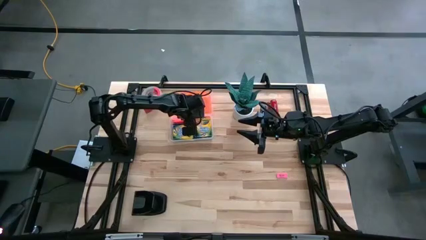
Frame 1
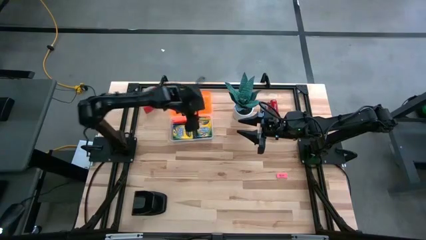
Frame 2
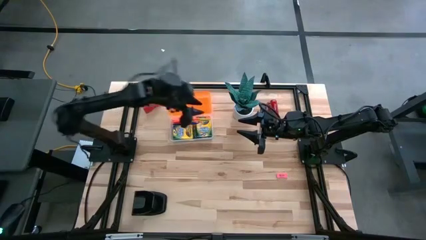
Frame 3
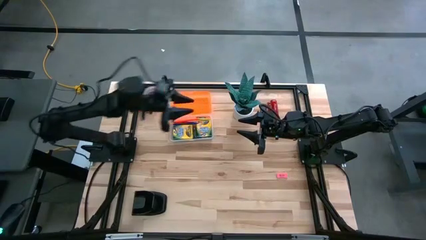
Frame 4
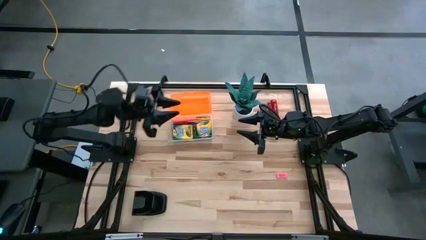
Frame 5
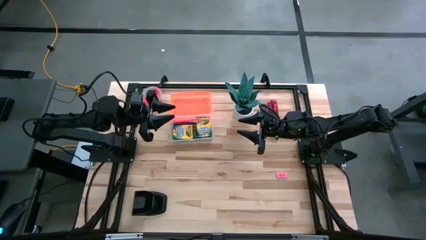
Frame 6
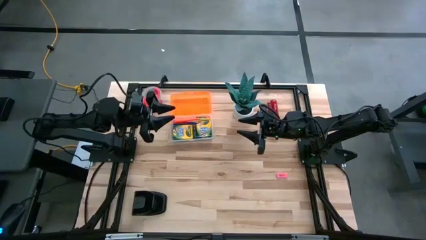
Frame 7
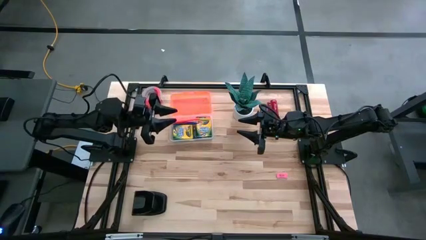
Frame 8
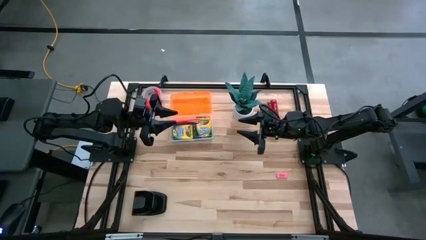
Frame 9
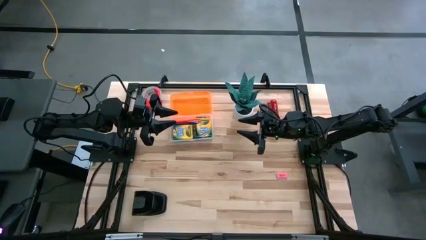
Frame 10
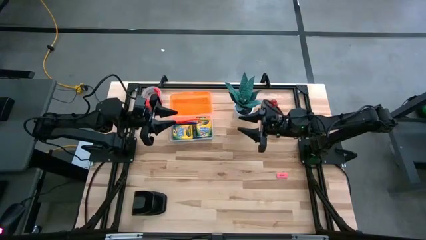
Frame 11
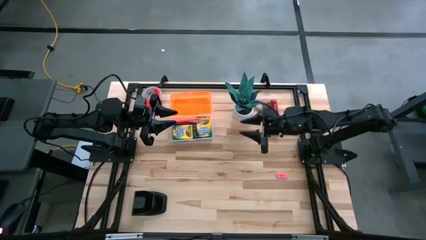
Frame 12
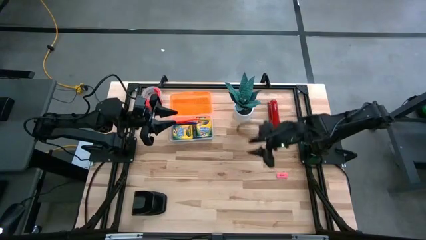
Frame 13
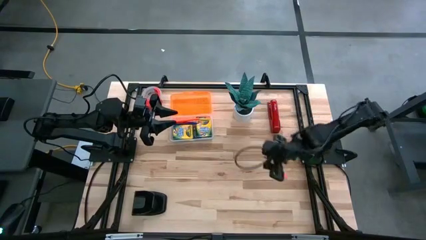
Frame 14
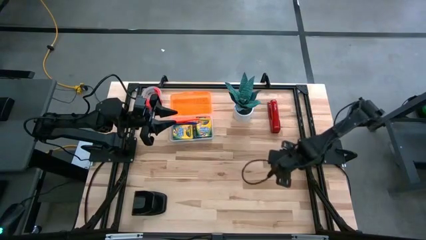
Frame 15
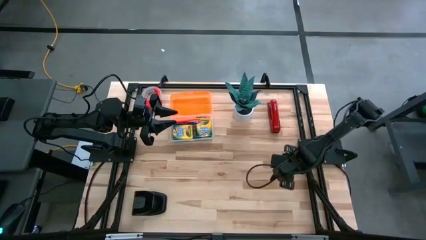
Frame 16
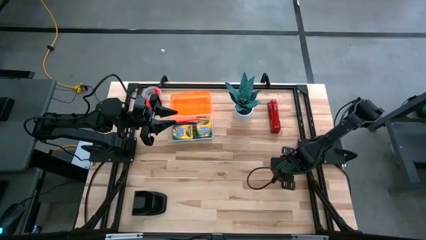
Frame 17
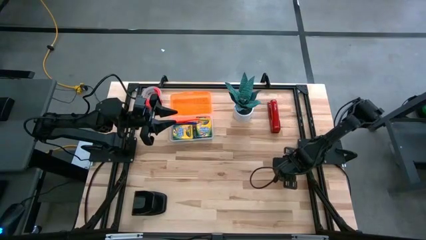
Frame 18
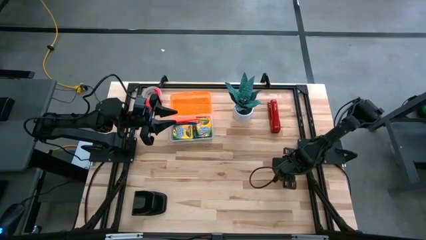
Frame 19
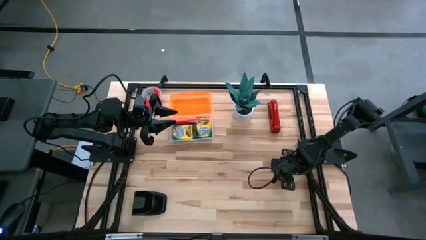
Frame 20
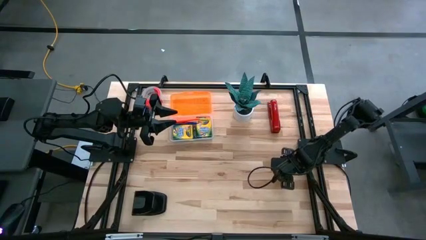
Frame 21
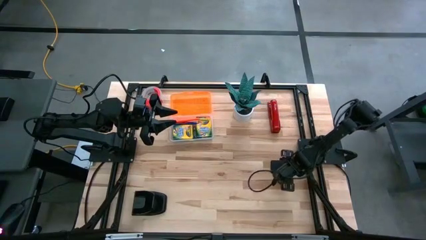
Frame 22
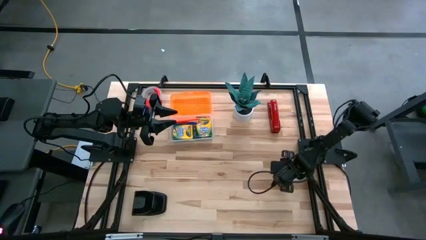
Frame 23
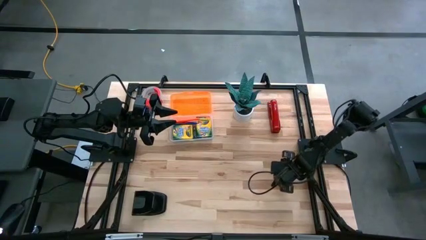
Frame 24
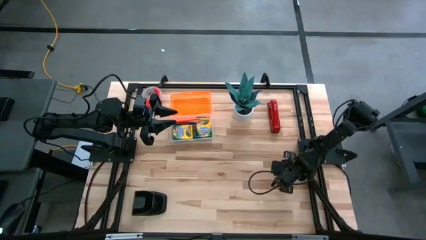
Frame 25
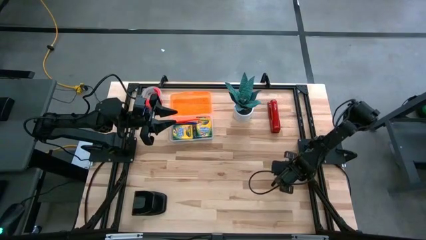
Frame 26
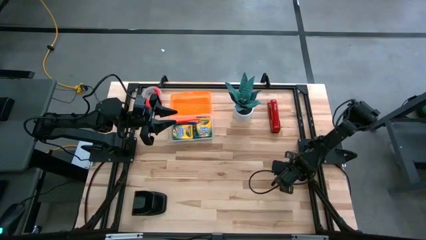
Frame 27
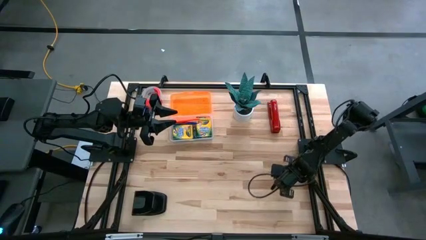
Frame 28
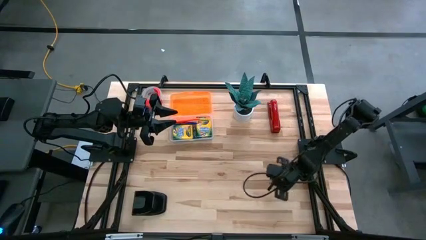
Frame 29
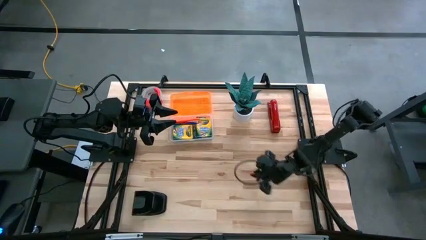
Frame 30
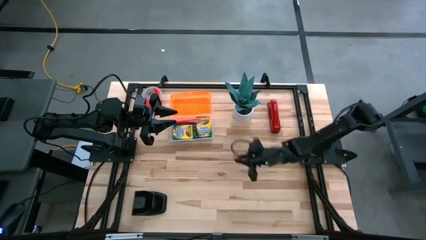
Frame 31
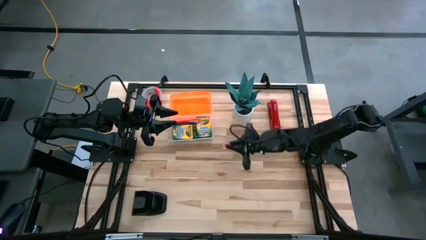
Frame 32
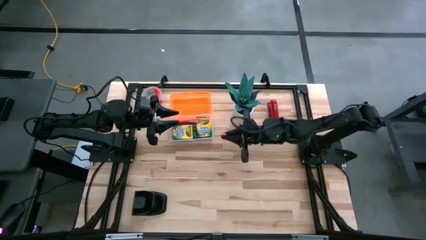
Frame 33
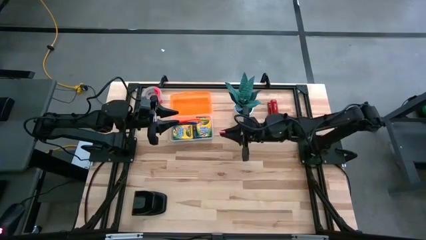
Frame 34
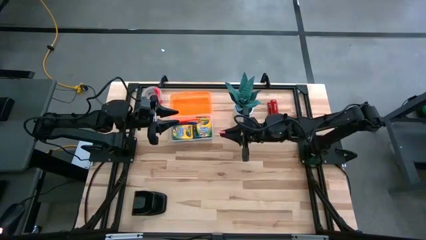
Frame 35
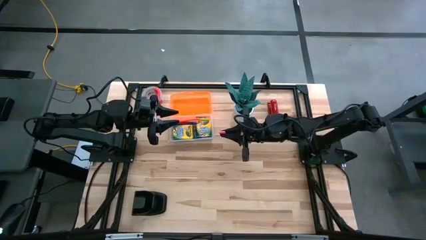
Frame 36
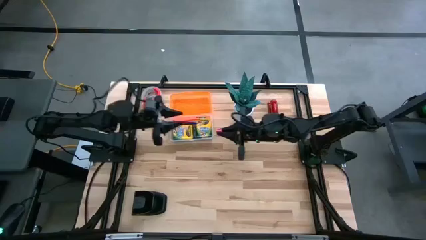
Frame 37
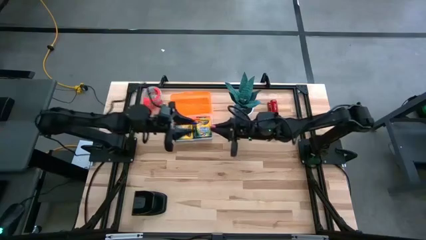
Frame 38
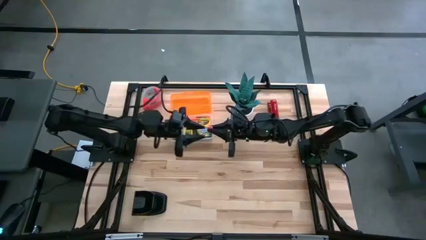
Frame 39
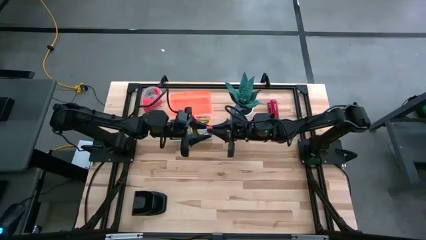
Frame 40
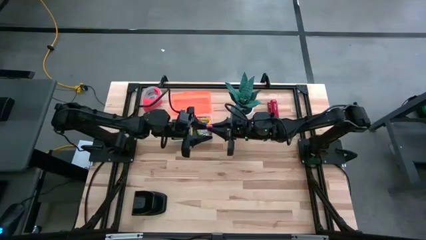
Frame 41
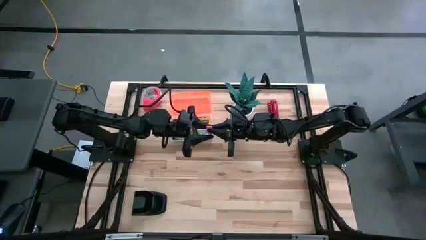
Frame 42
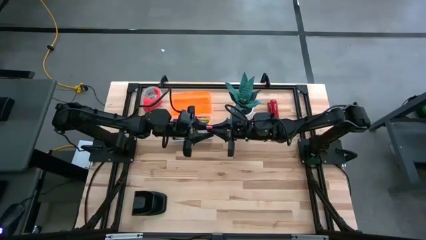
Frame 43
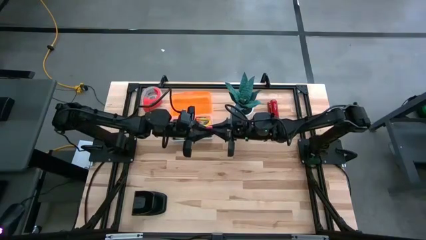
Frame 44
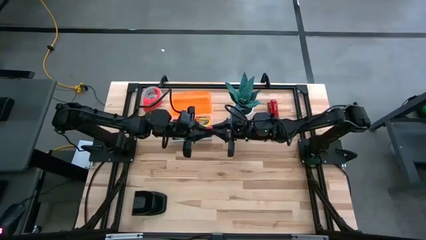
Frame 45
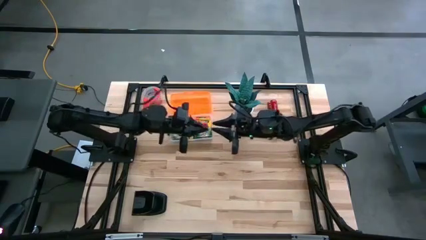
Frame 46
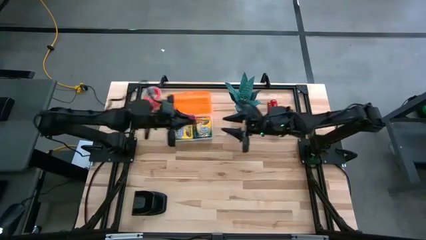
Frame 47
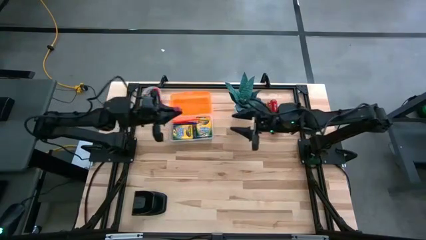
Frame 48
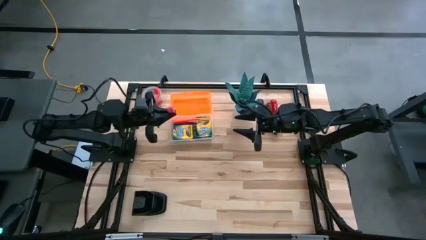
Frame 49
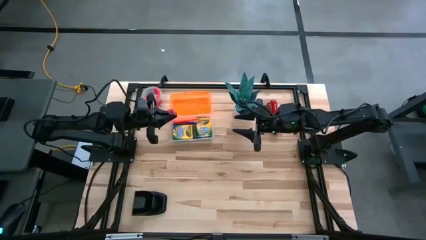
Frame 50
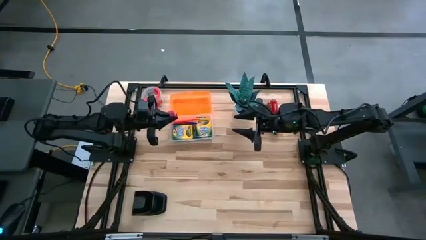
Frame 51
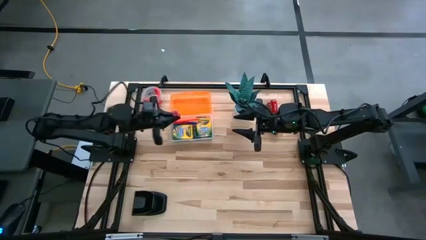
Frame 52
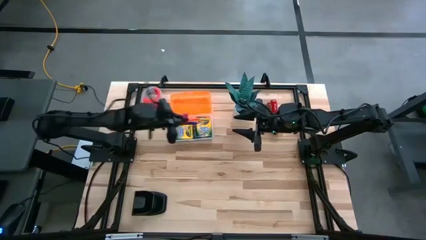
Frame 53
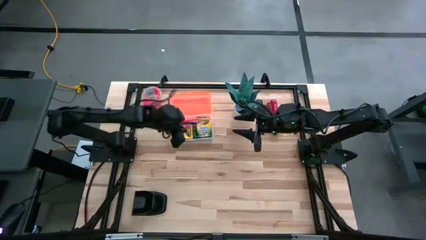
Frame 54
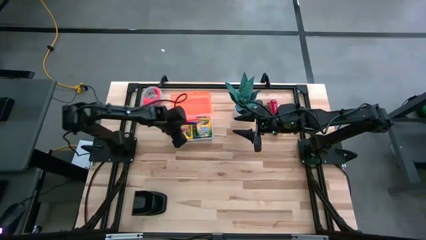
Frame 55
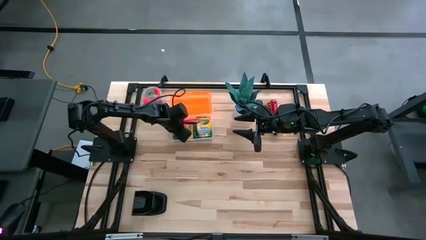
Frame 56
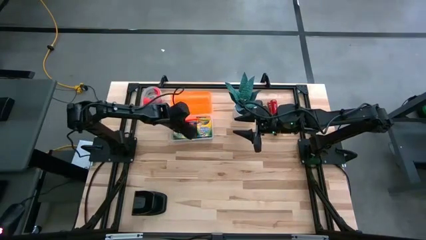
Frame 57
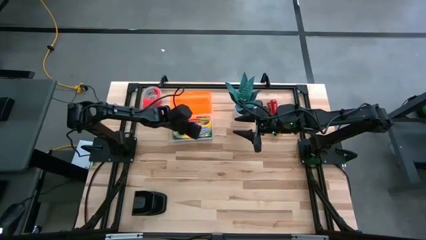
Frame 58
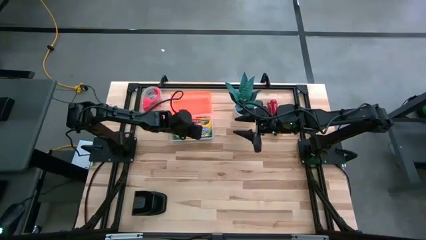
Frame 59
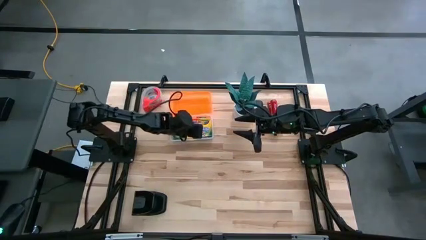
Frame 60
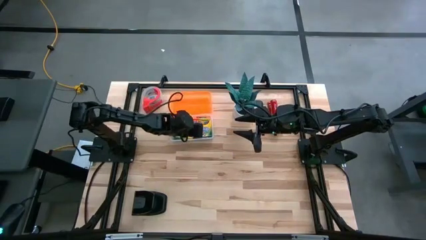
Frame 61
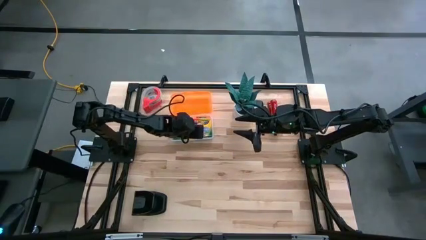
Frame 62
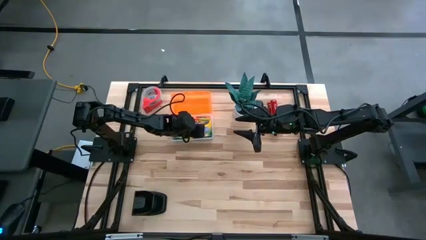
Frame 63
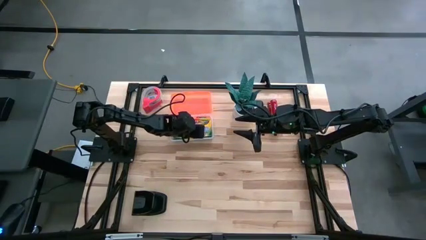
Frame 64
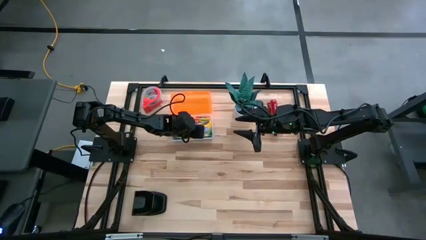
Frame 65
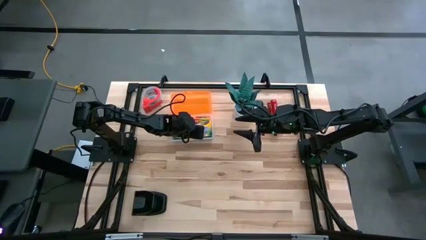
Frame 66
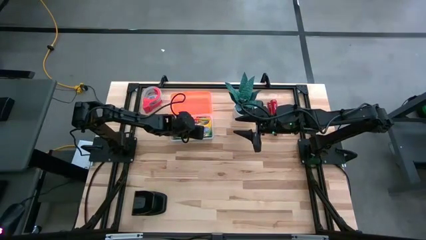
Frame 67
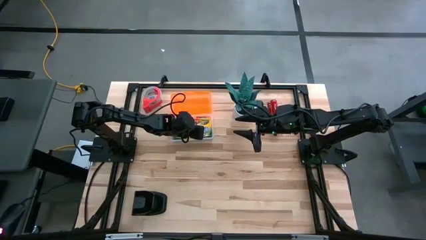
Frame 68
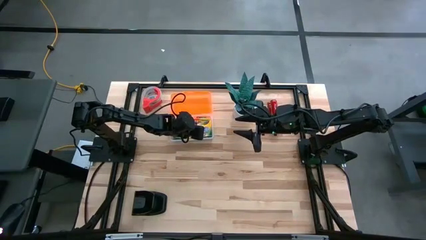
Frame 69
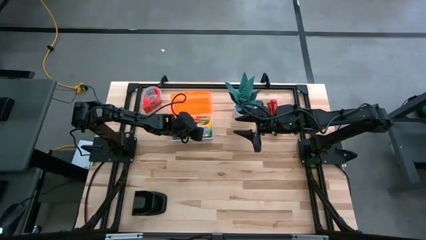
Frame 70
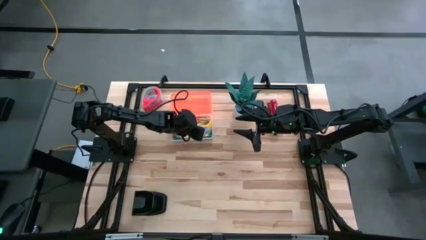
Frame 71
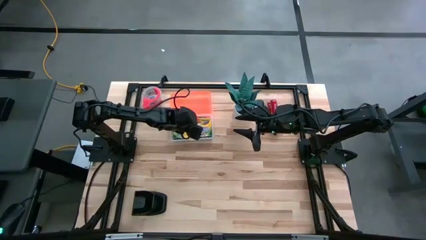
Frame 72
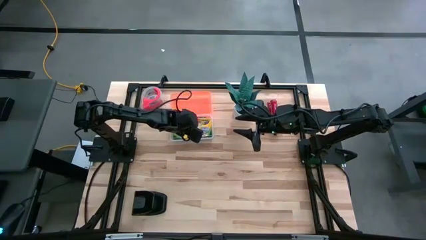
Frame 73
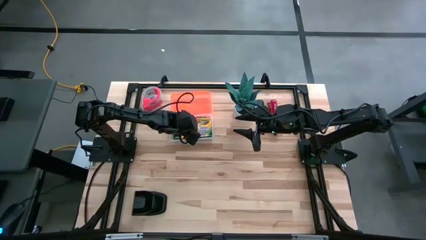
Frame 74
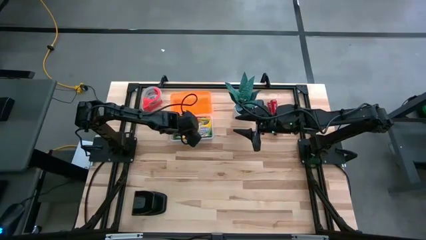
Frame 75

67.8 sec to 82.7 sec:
Task: Pack school essentials
Put the pink eraser into the orange supply box

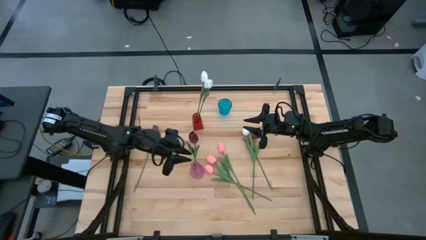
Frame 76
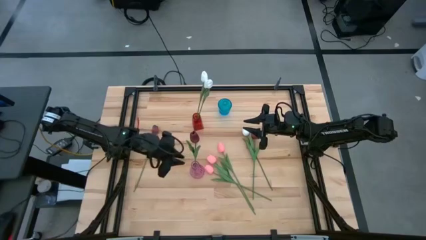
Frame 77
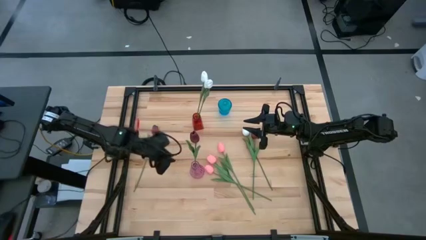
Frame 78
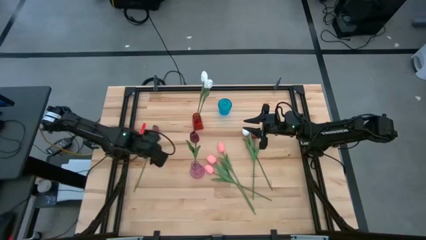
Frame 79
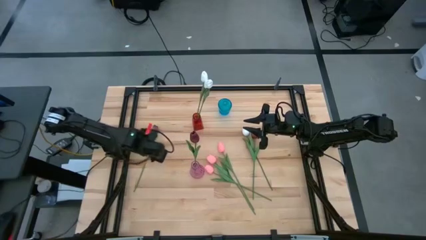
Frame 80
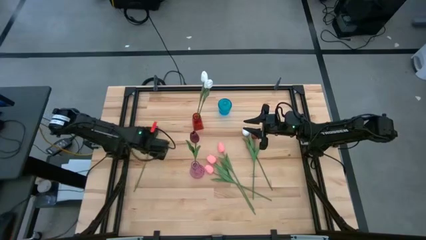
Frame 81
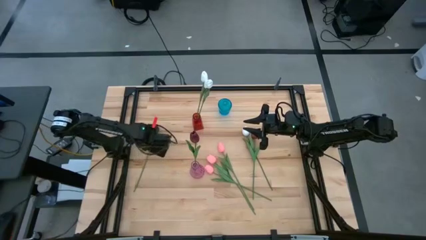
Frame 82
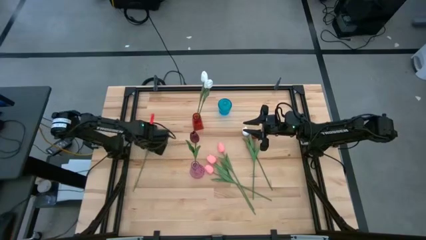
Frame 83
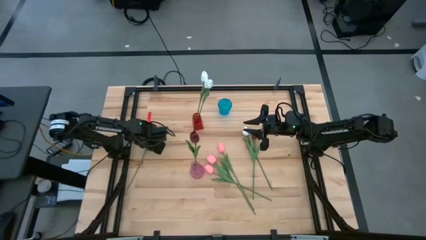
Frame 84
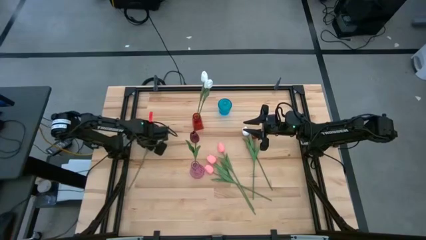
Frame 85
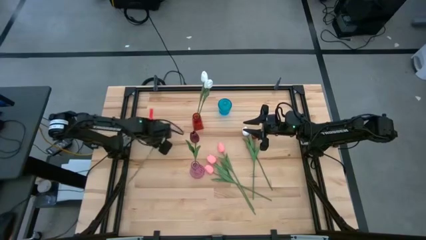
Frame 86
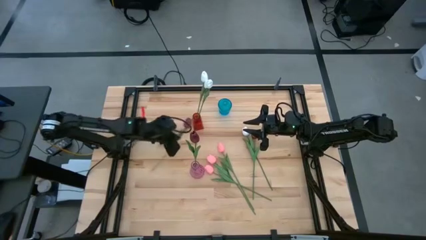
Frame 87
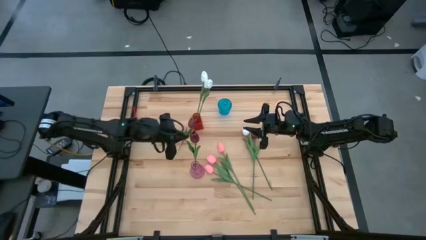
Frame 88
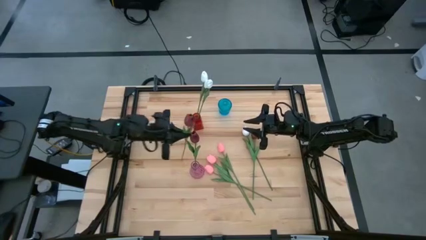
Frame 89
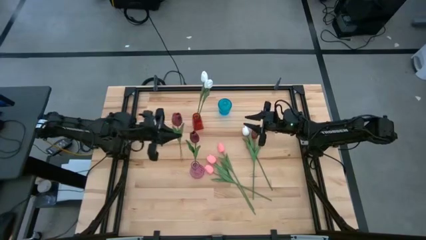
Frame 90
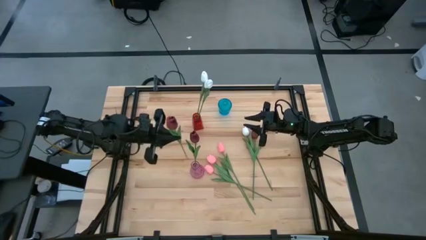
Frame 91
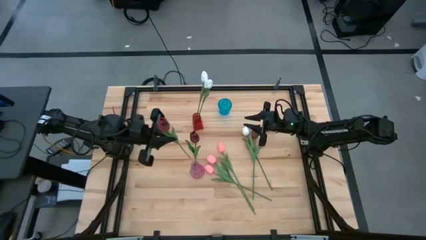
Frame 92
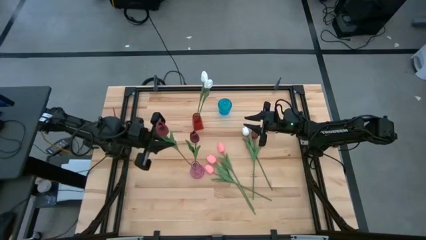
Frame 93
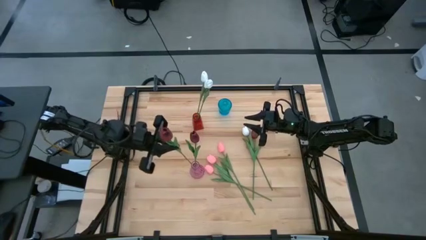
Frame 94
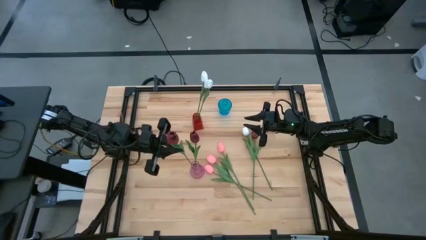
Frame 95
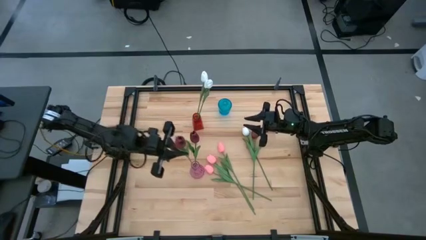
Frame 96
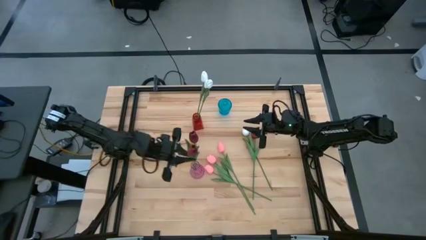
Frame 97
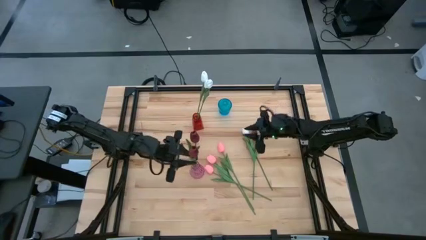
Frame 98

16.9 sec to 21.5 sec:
Task: Sort flowers into vase by color
Put the left red tulip into the pink flower vase
